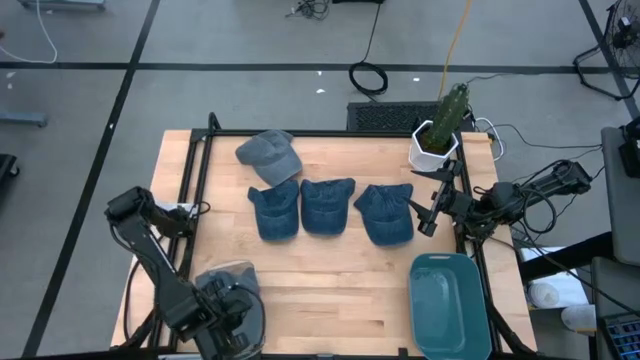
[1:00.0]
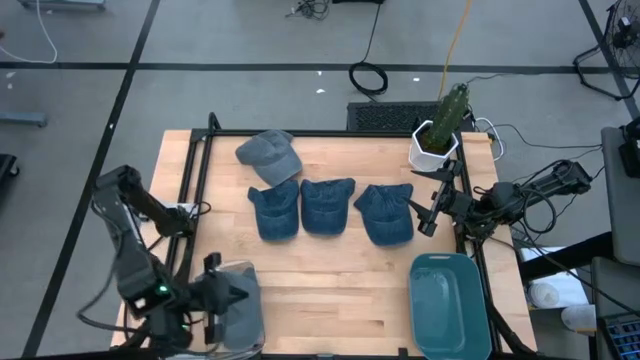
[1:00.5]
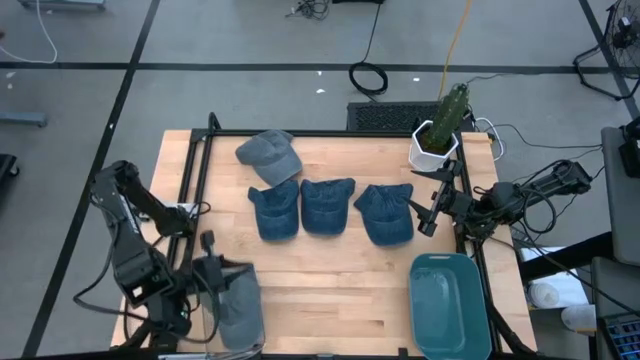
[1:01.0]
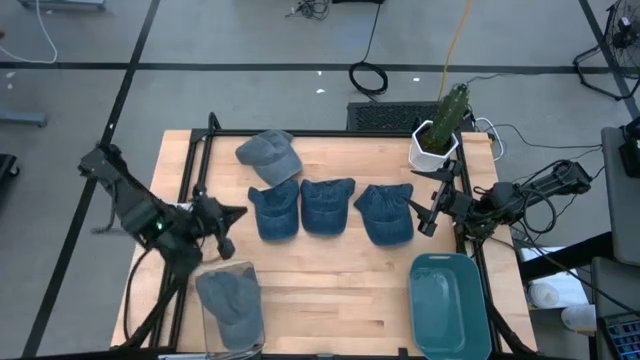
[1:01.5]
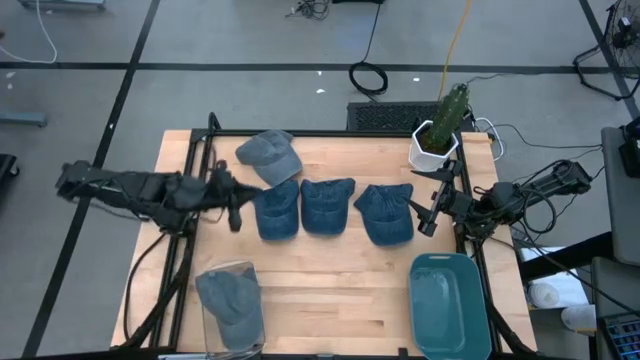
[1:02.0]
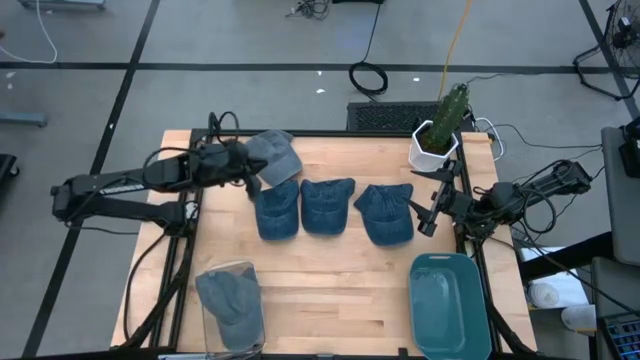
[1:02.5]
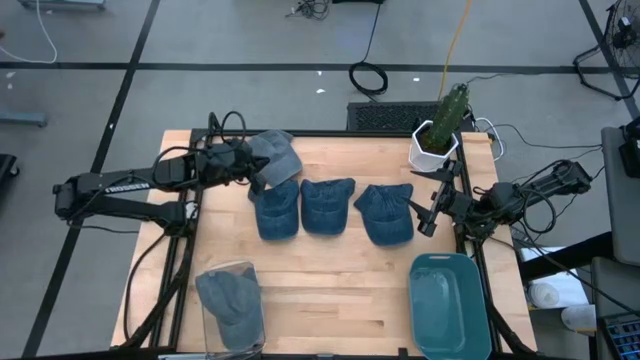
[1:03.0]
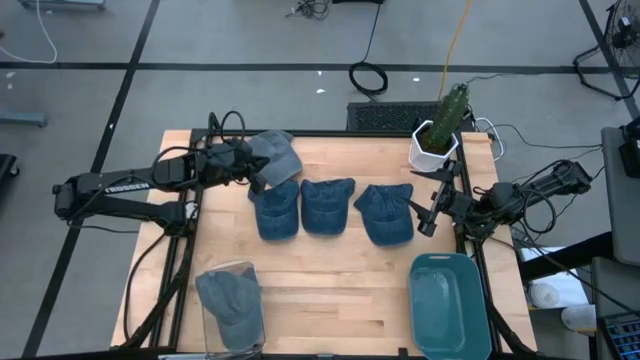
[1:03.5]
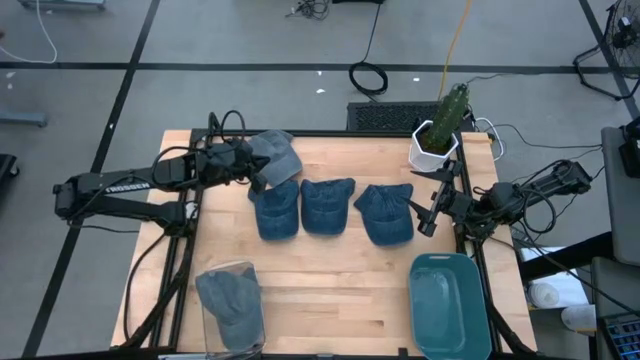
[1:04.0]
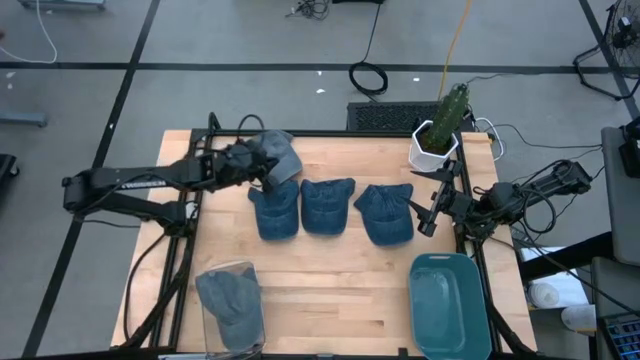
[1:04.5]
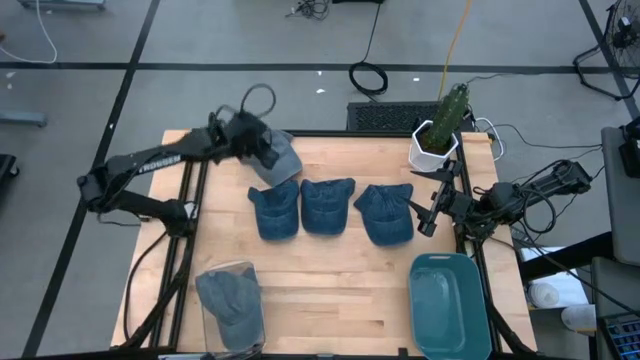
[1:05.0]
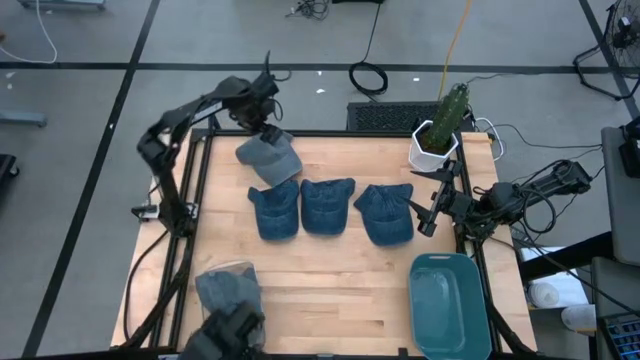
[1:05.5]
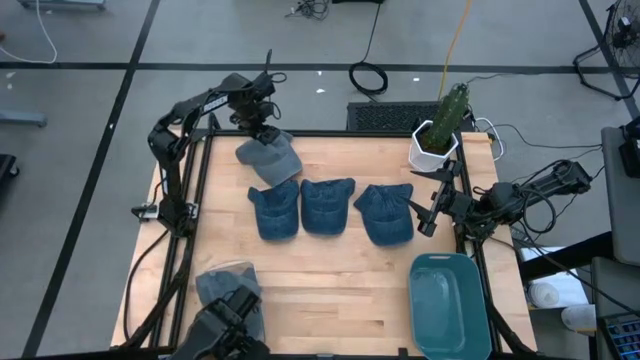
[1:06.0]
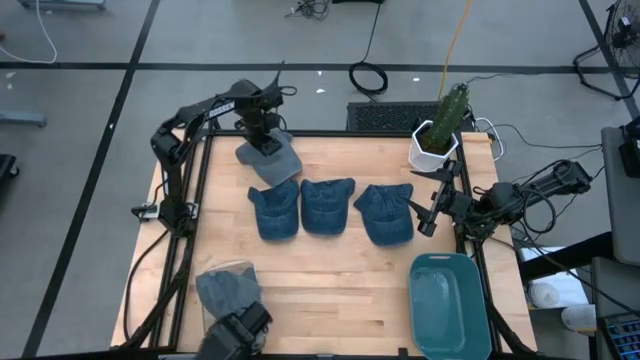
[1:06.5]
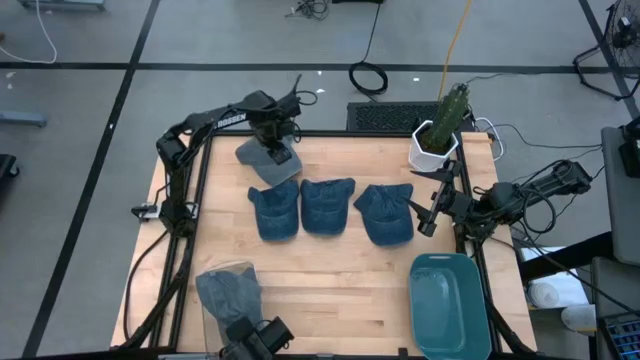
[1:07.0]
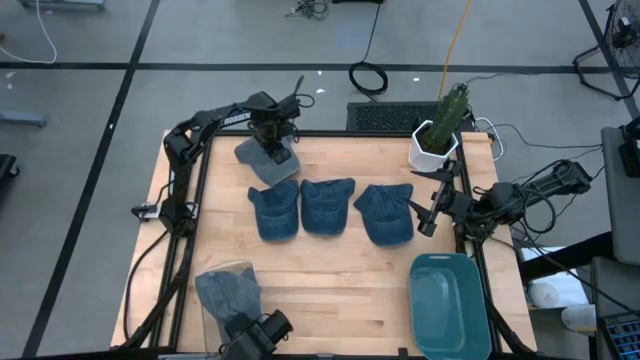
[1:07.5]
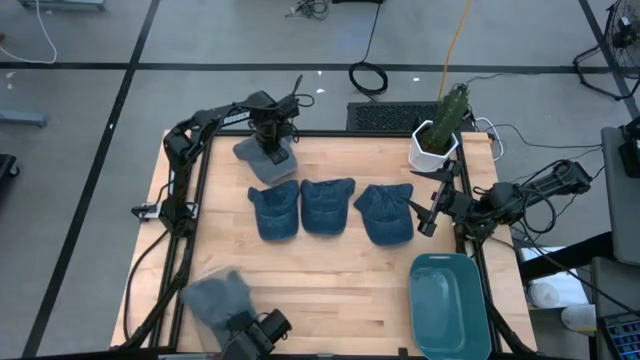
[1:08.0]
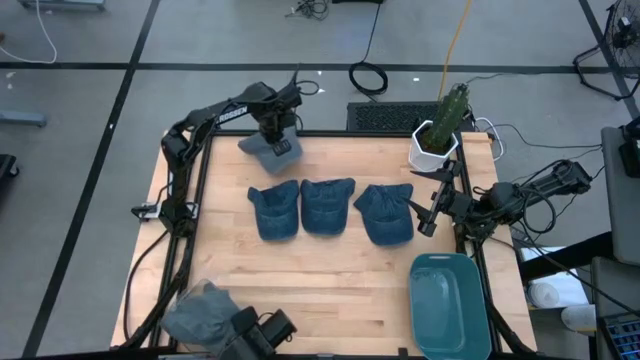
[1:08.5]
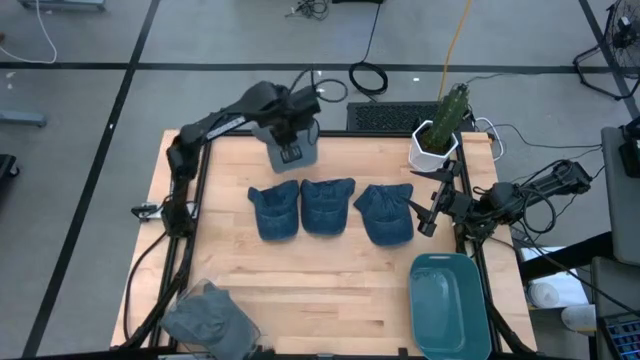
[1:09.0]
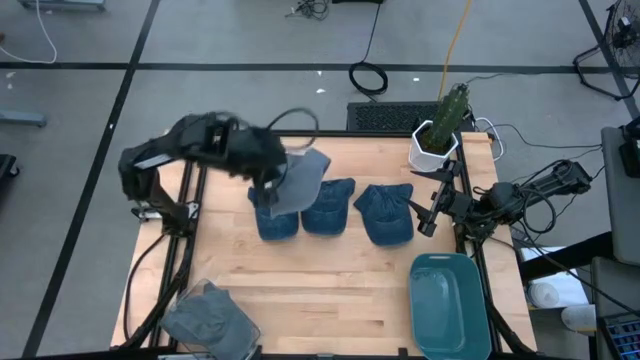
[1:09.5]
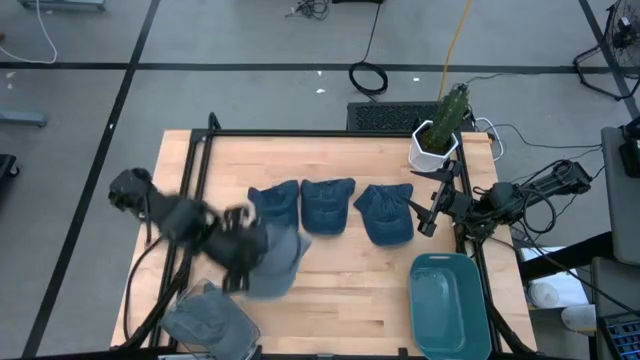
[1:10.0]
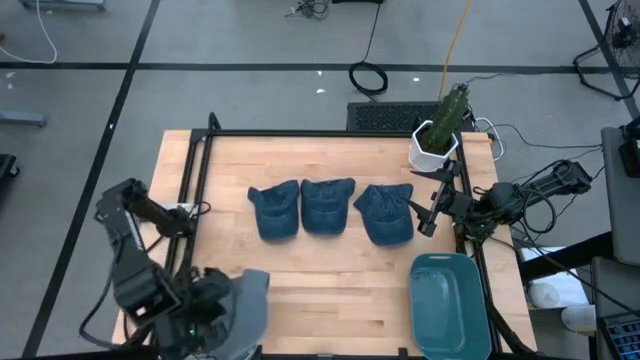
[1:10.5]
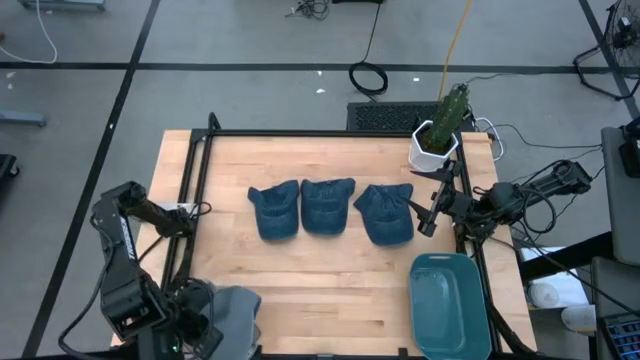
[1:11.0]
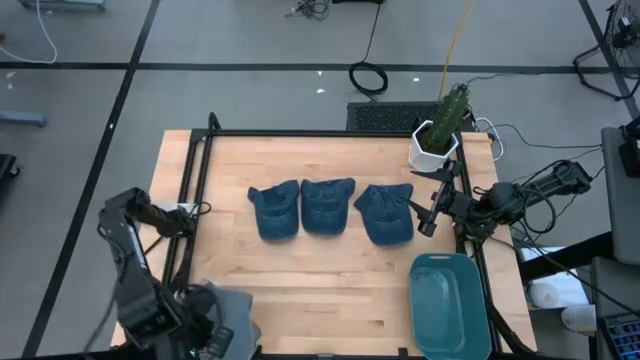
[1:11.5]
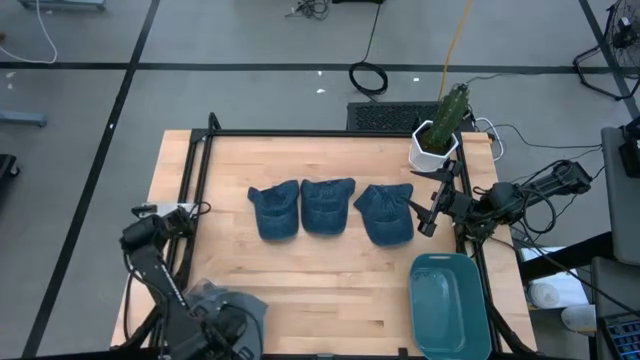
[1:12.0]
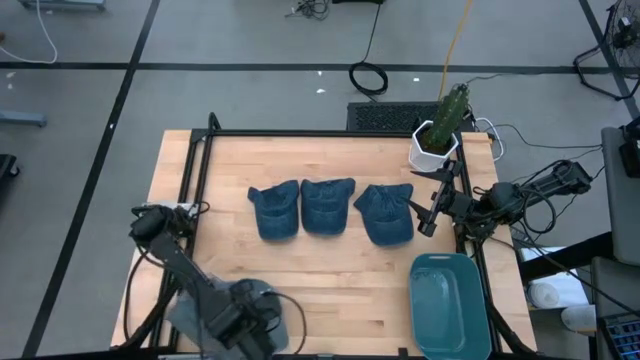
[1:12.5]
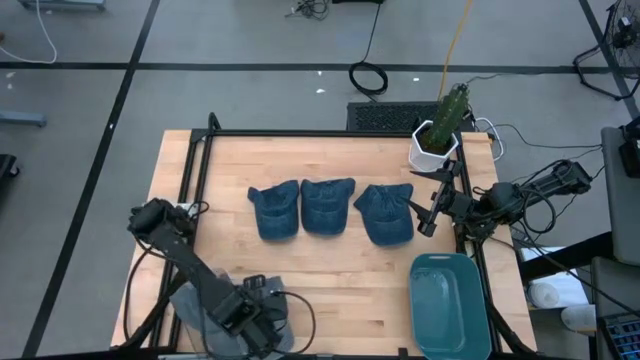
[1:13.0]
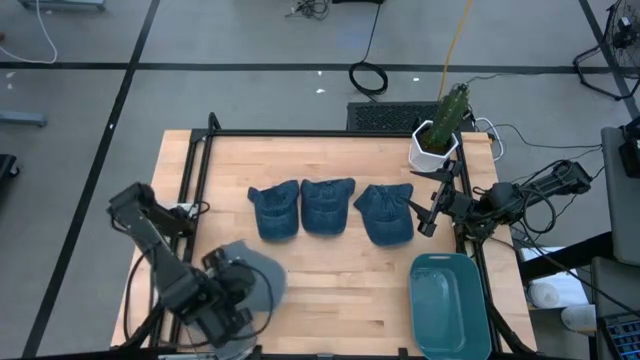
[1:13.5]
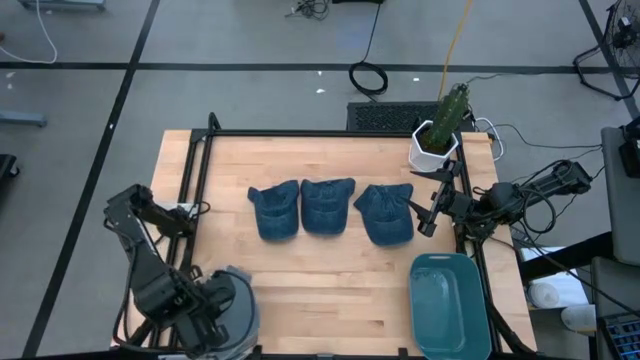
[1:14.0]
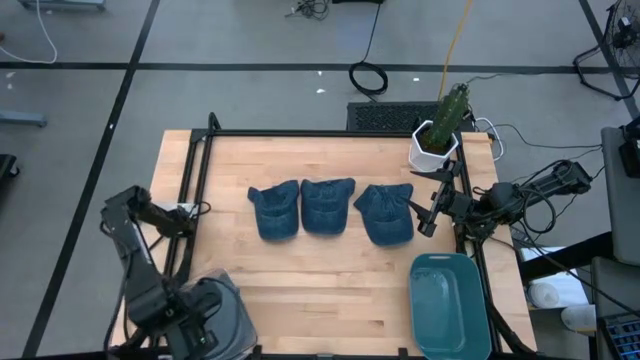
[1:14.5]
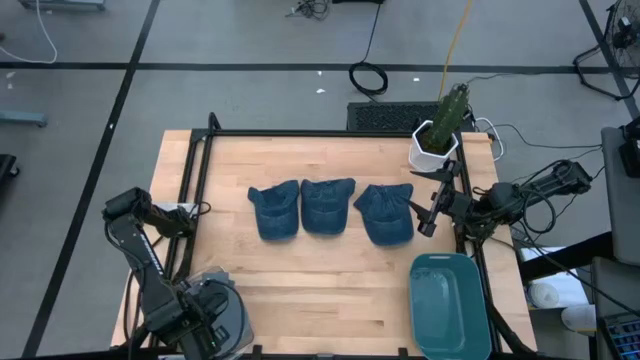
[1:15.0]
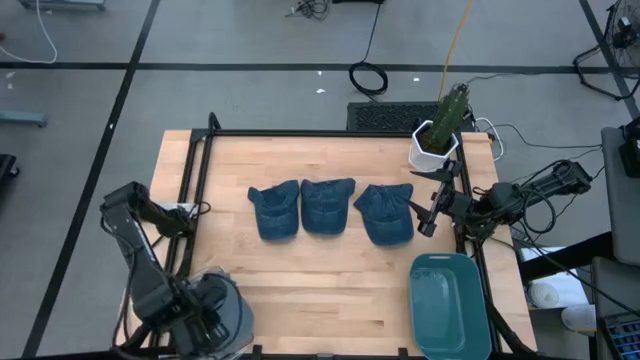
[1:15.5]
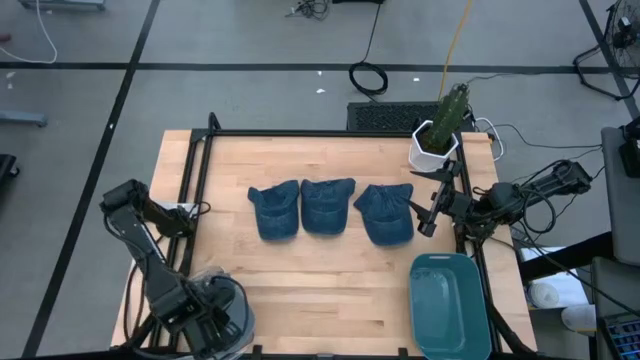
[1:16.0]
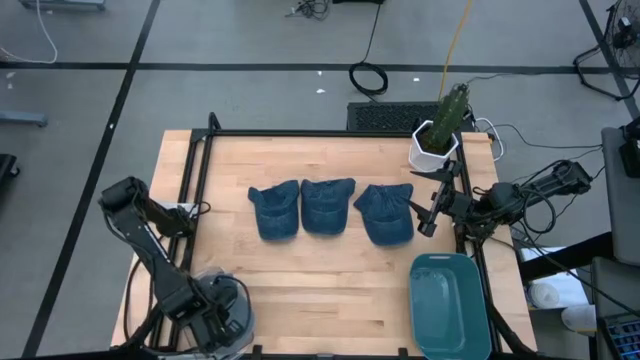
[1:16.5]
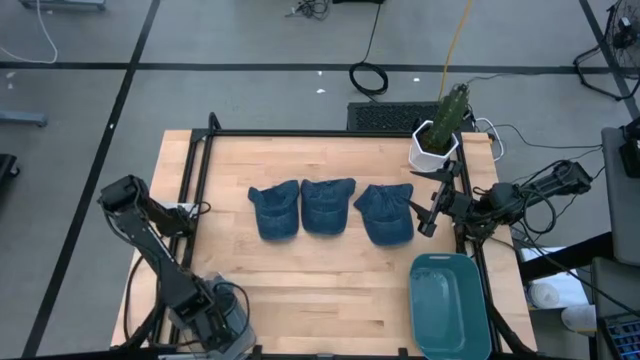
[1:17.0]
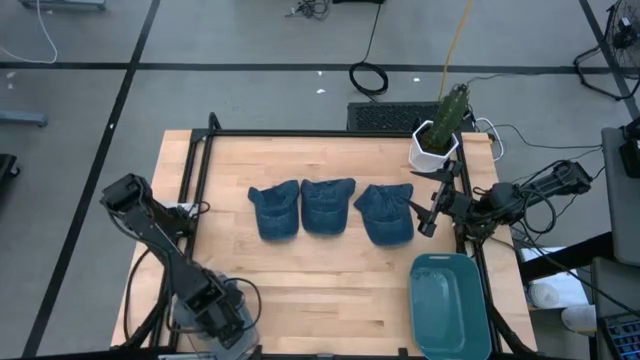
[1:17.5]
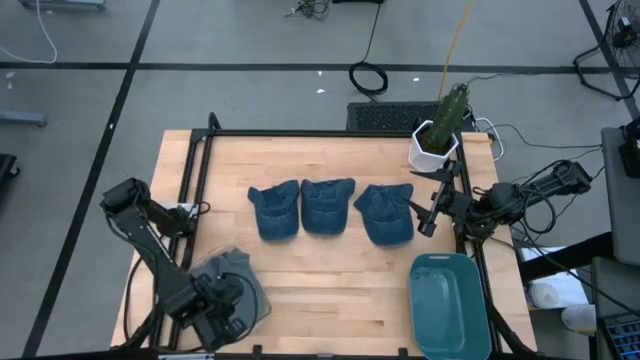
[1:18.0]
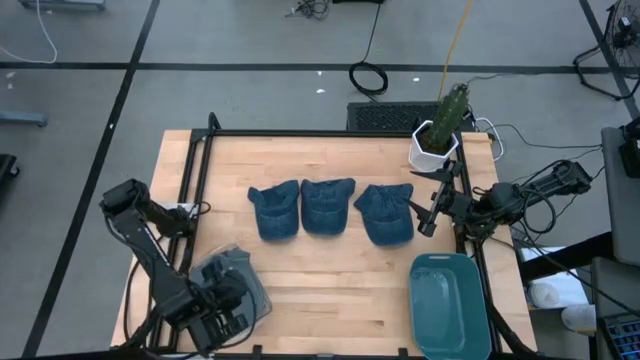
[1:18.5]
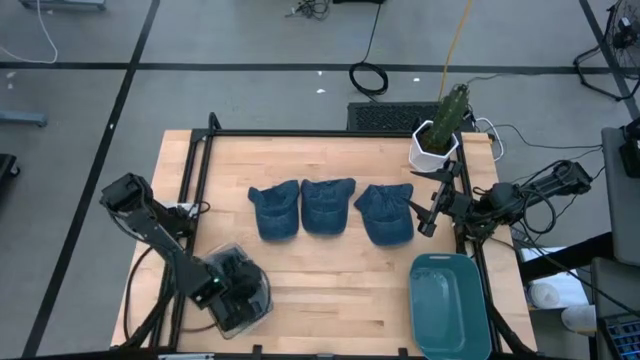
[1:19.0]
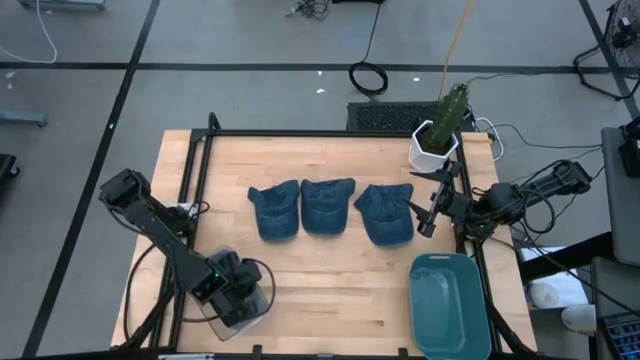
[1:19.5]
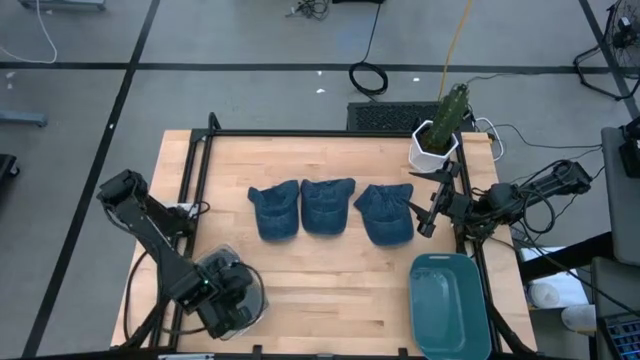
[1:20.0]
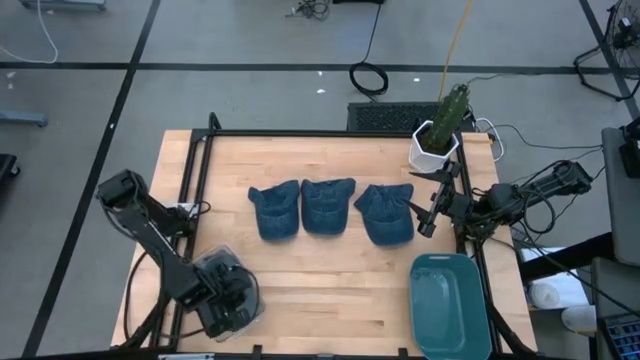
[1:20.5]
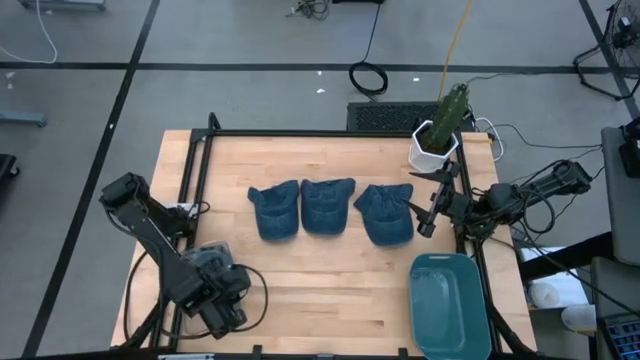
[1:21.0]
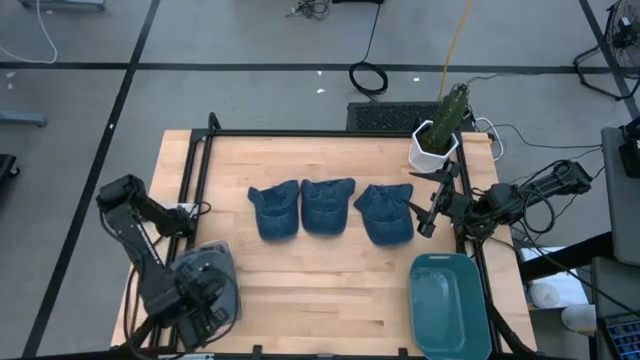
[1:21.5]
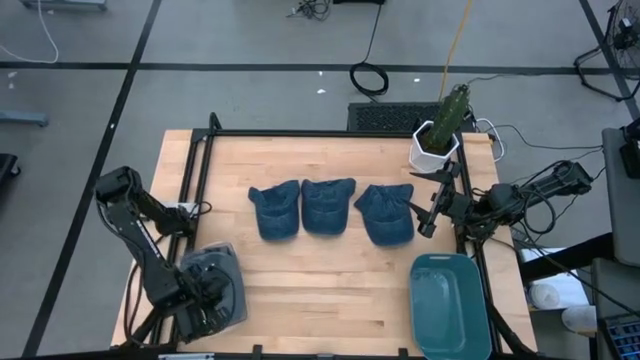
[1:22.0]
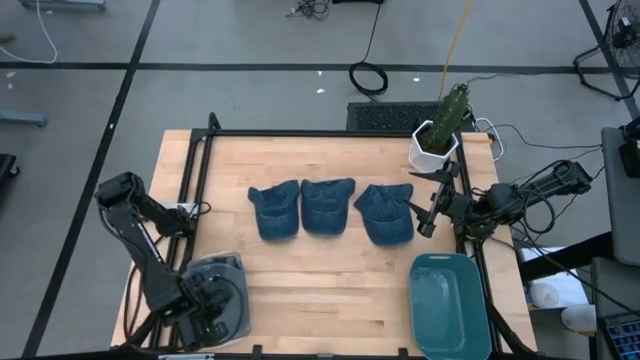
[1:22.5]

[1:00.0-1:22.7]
Task: Pick & Place hat
Put the gray cap into the transparent bin
